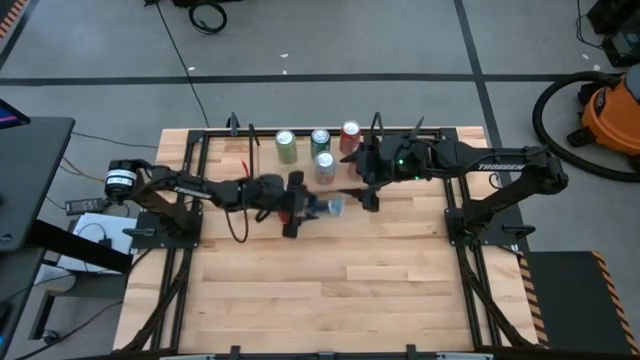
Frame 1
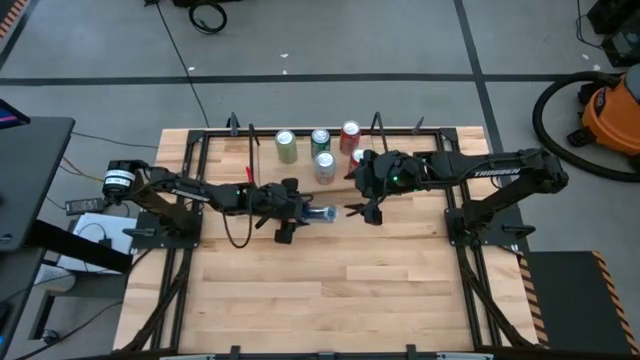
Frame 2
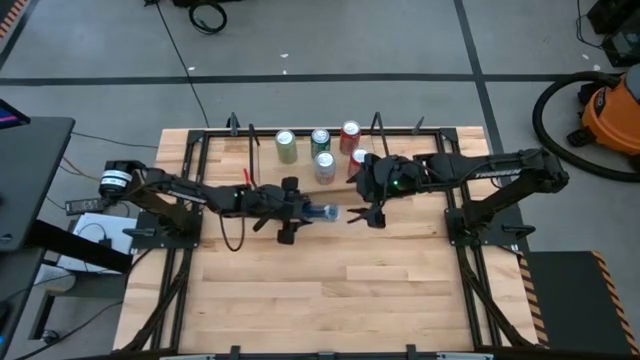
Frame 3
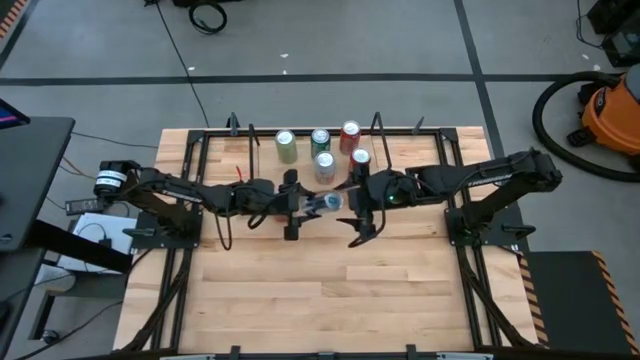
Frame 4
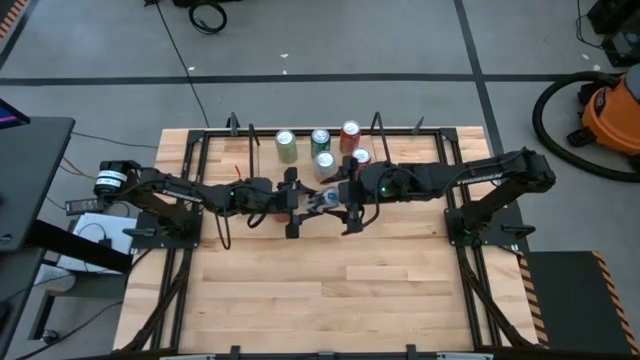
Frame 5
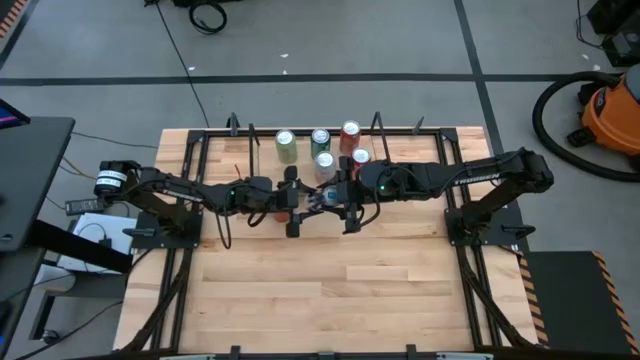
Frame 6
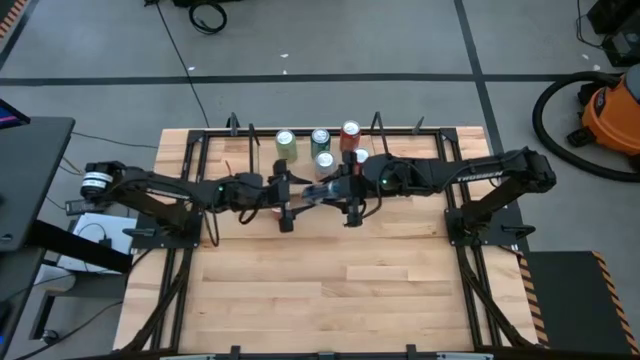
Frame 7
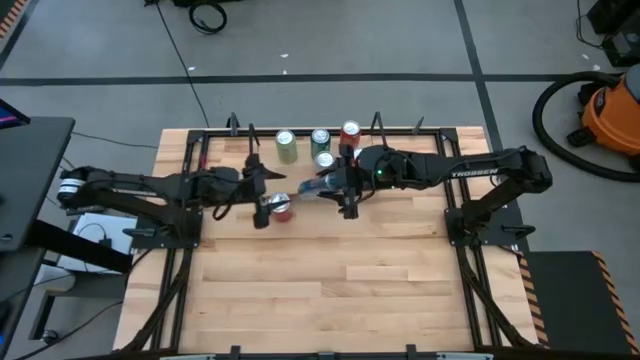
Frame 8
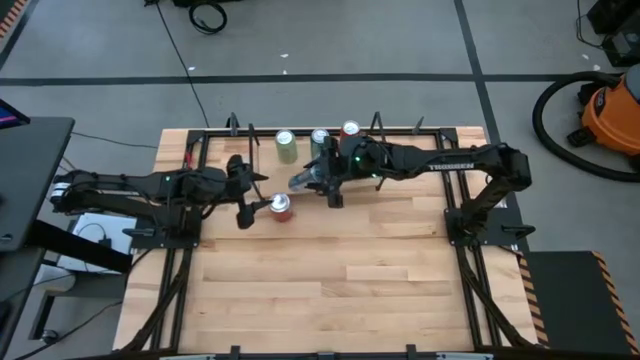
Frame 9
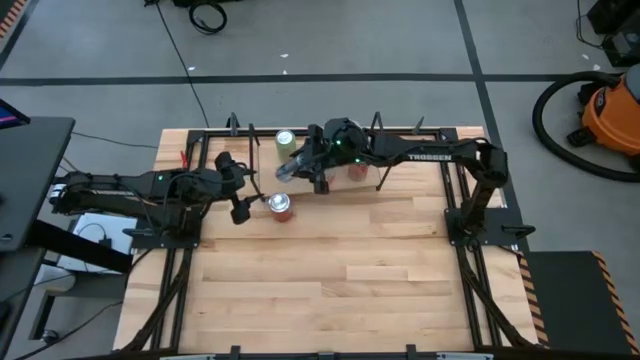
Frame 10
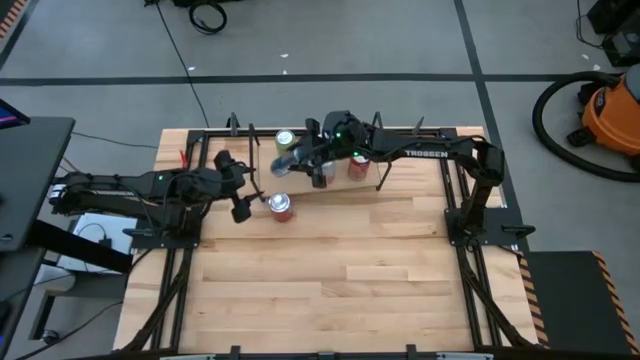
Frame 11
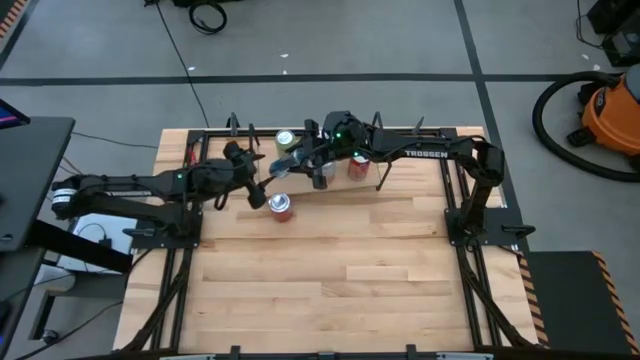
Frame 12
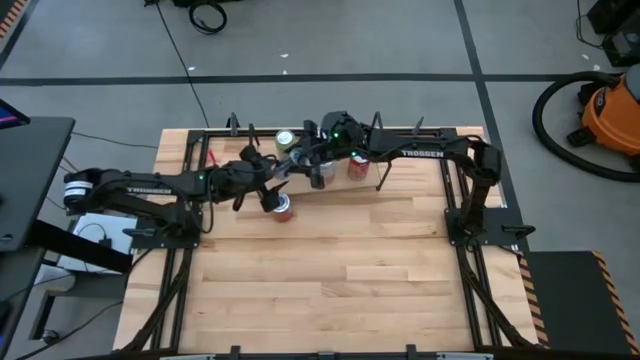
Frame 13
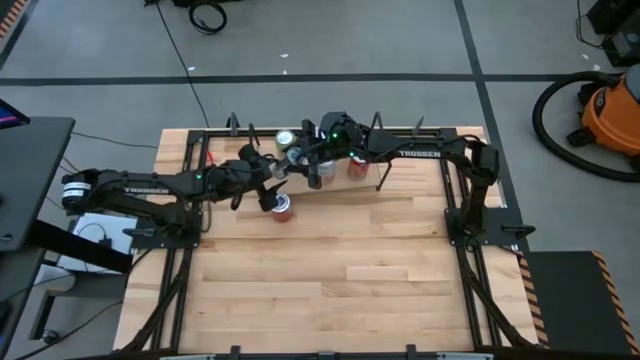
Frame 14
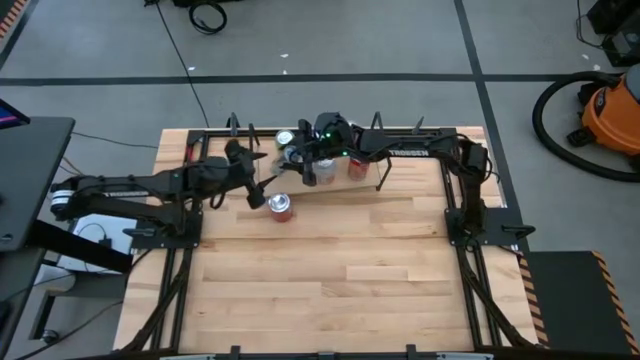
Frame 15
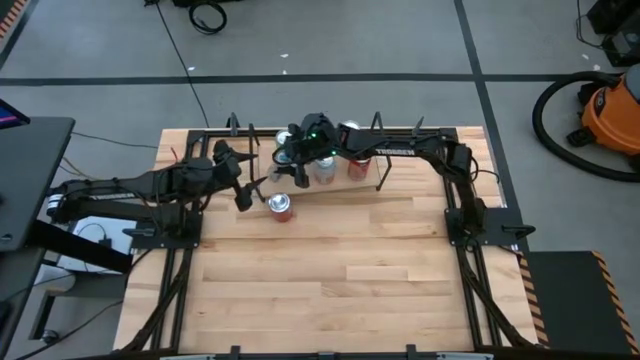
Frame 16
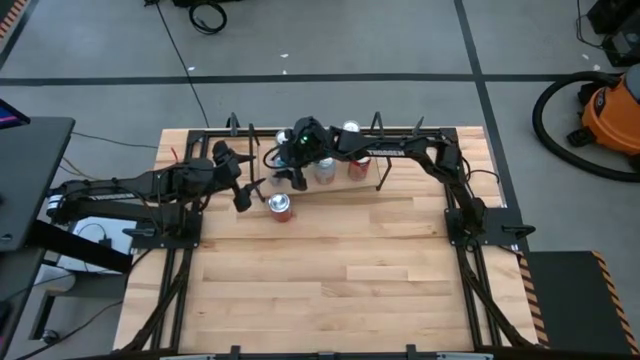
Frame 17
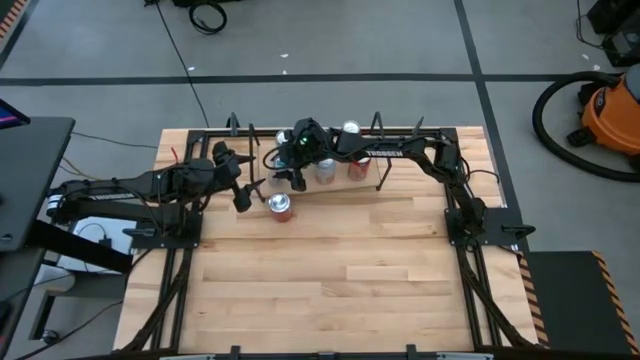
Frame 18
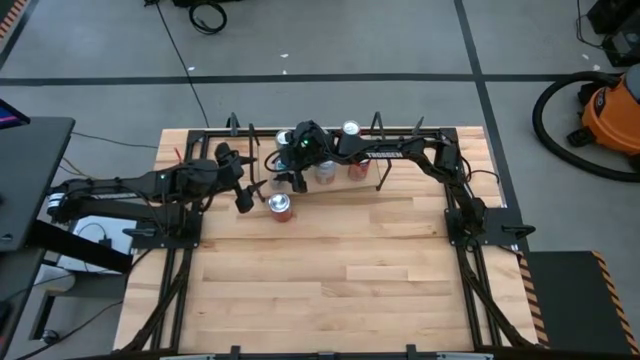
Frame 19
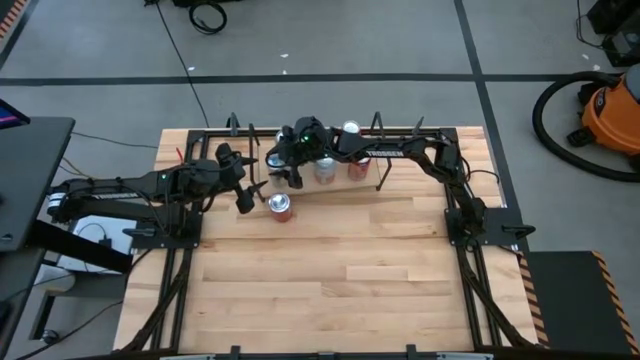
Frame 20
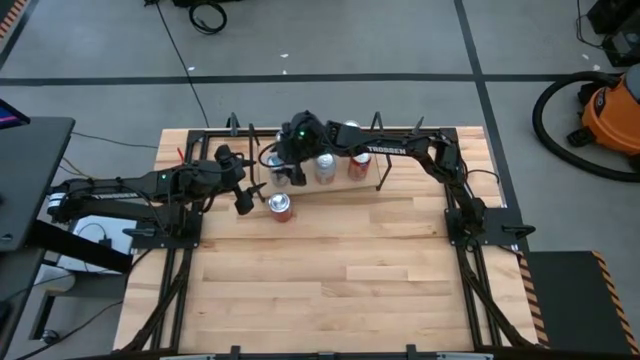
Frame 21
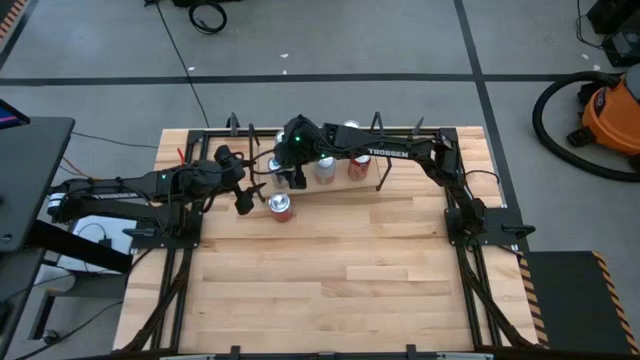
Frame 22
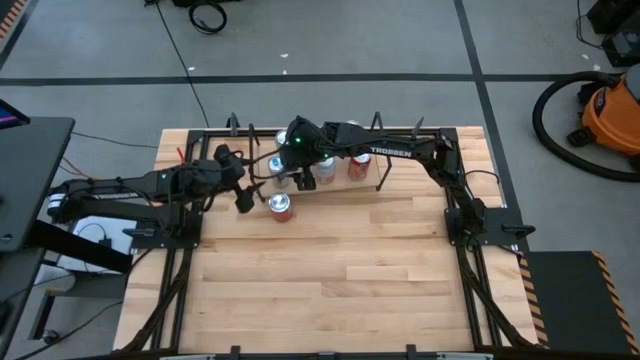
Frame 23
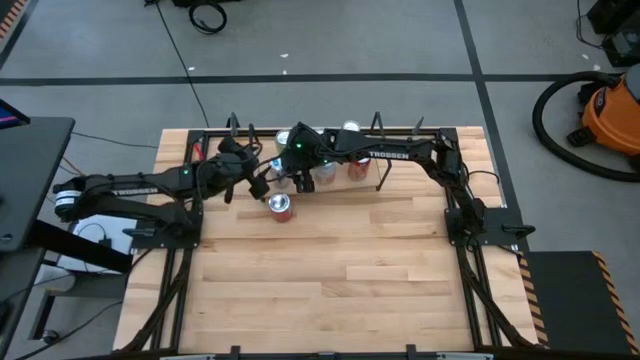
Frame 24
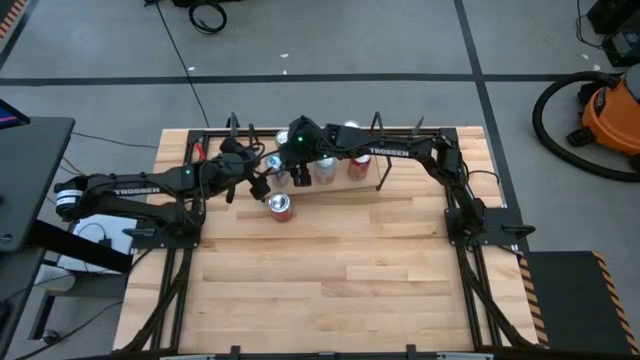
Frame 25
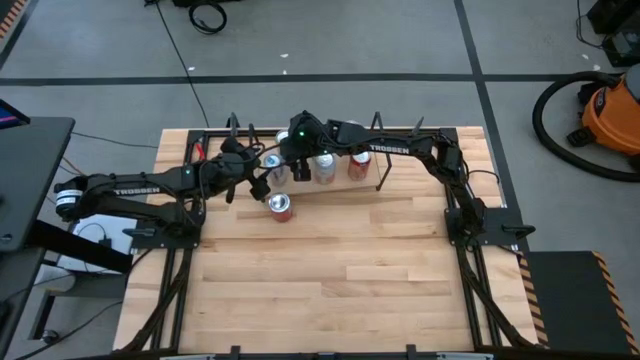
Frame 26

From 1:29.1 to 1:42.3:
Task: Place canned beverage on shelf
Put the blue soda can on the shelf

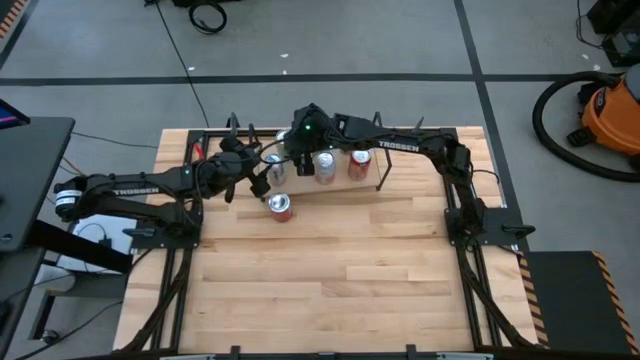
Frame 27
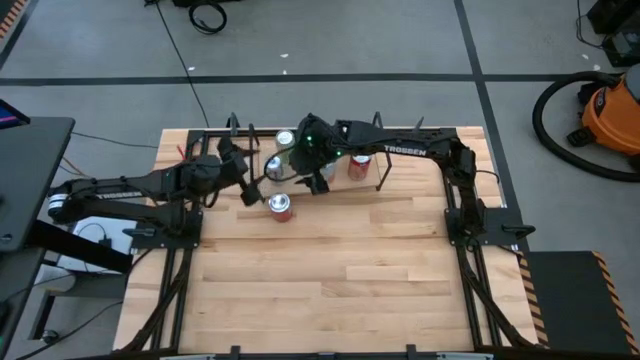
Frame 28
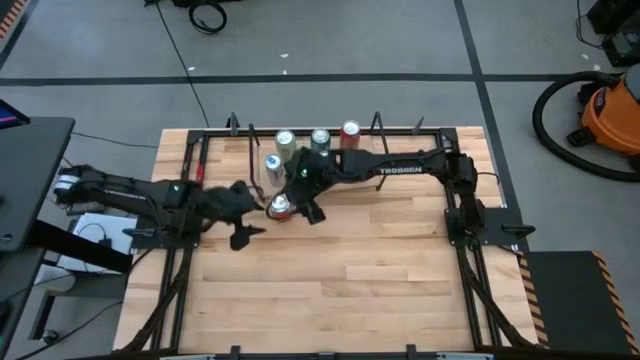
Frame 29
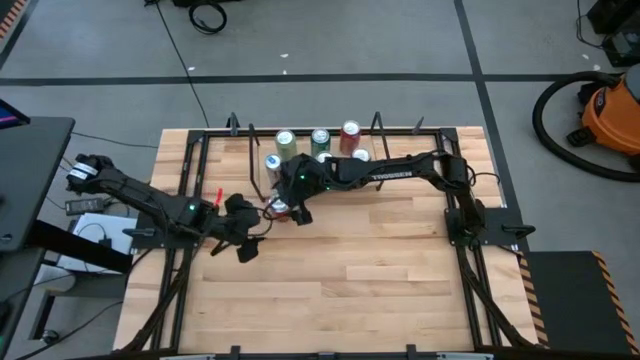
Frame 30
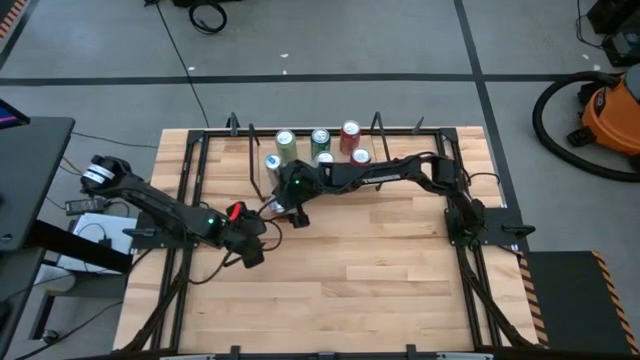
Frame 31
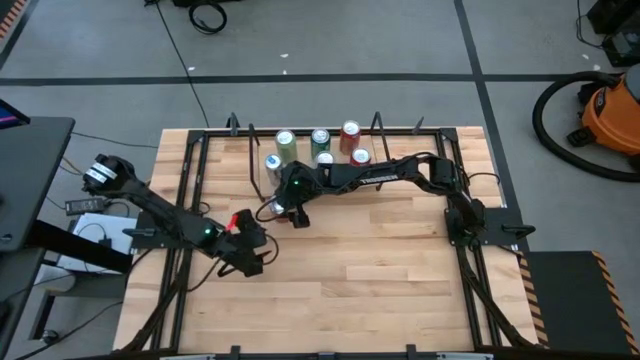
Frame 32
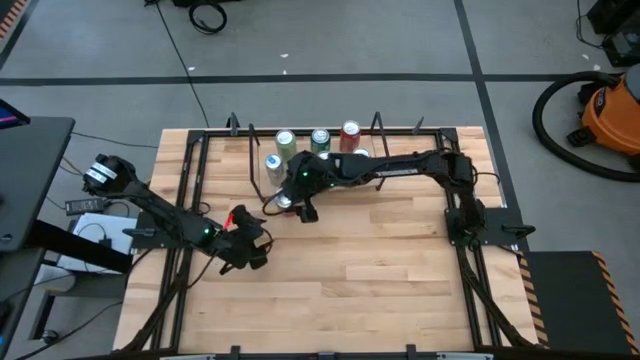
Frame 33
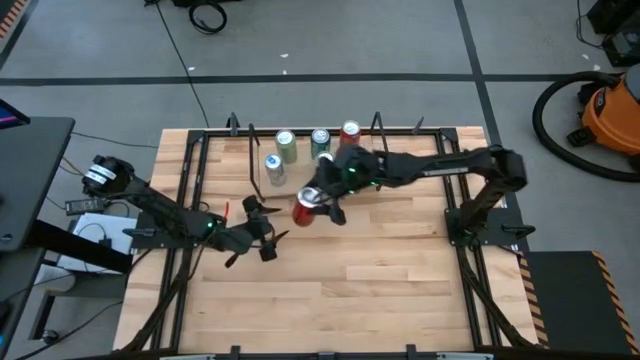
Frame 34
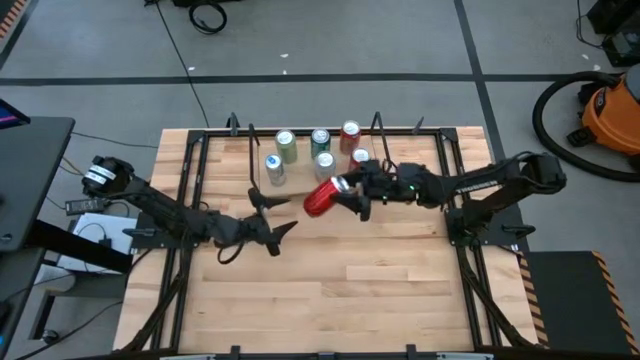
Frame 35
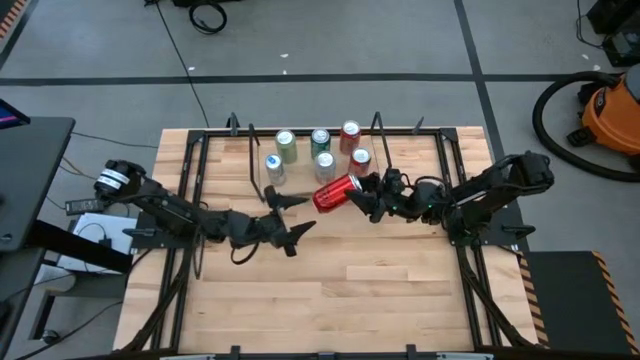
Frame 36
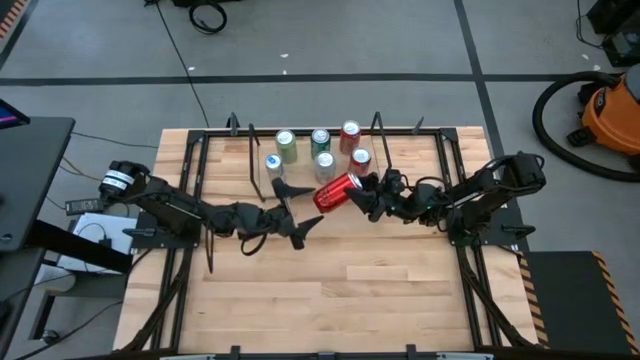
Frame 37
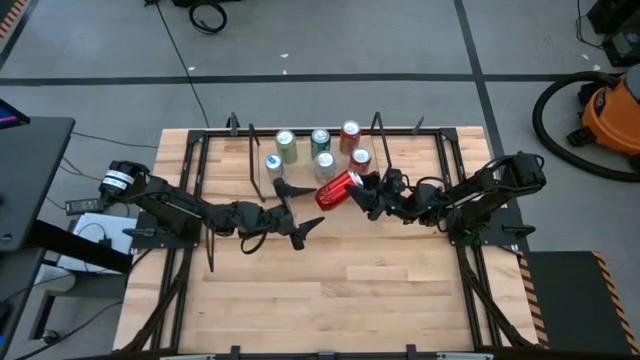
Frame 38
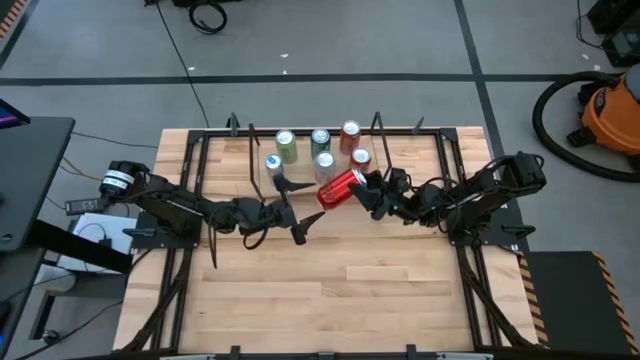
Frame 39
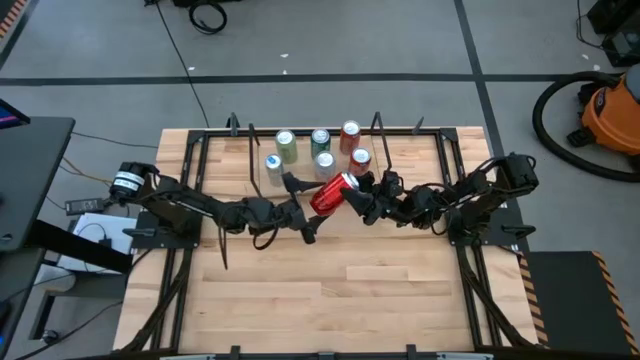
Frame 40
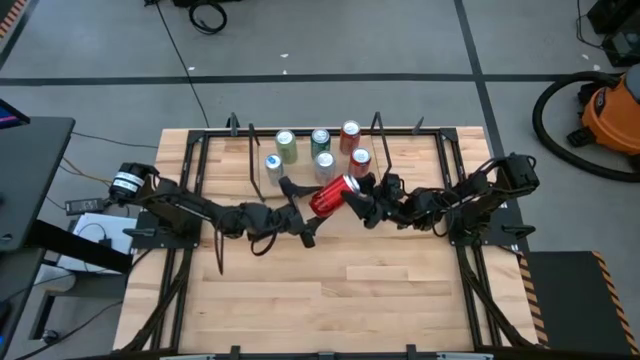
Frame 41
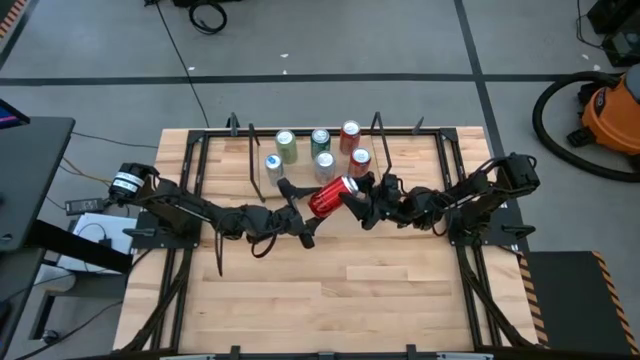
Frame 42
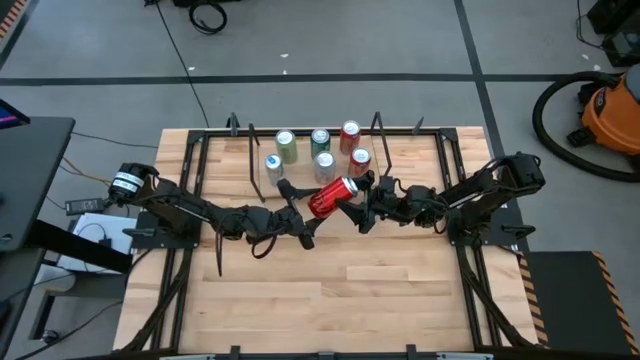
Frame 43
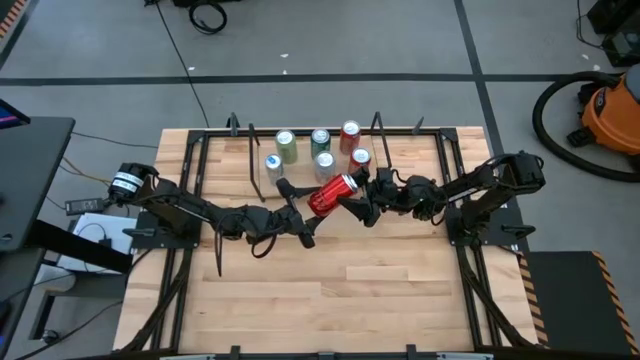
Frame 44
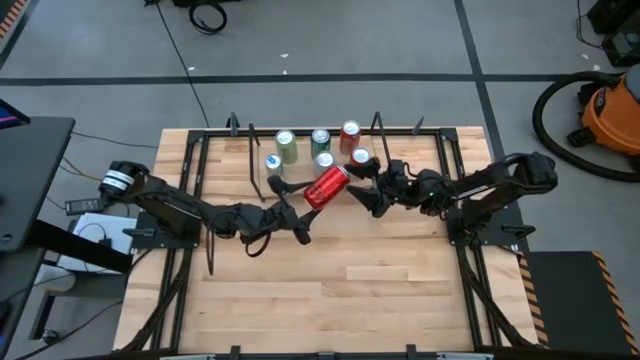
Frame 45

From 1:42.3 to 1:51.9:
Put the red-black soda can on the shelf
